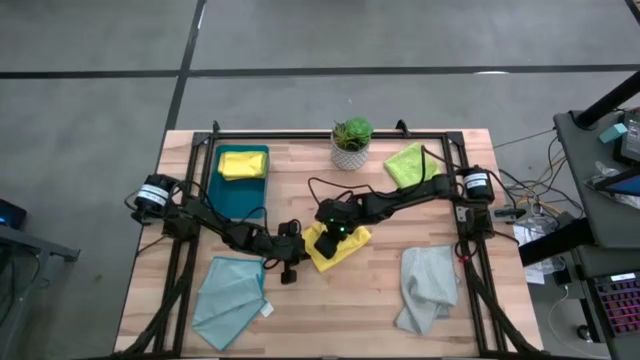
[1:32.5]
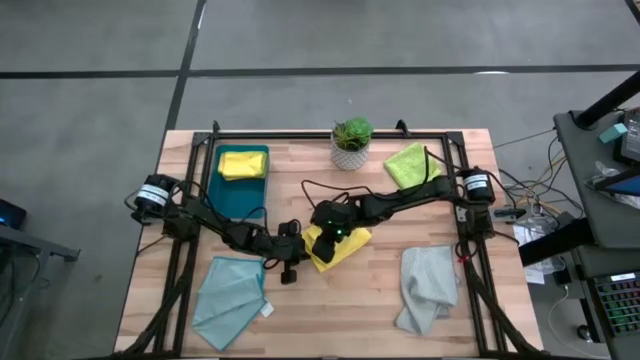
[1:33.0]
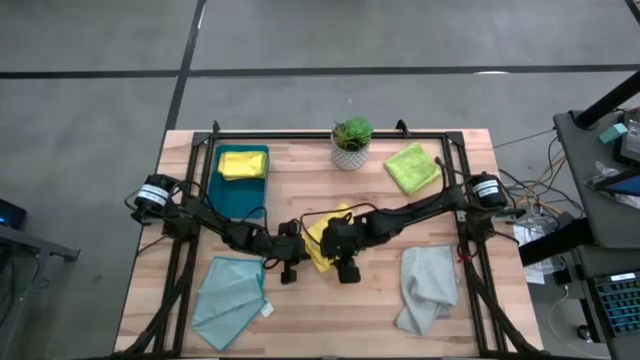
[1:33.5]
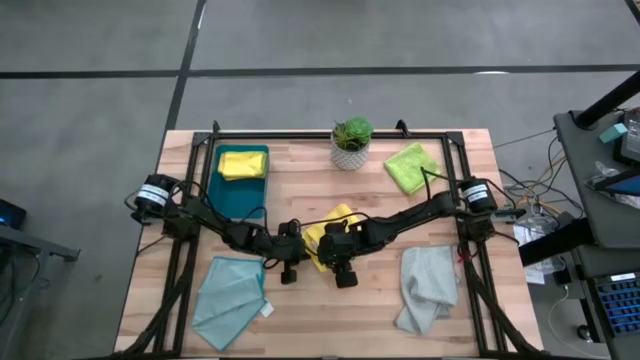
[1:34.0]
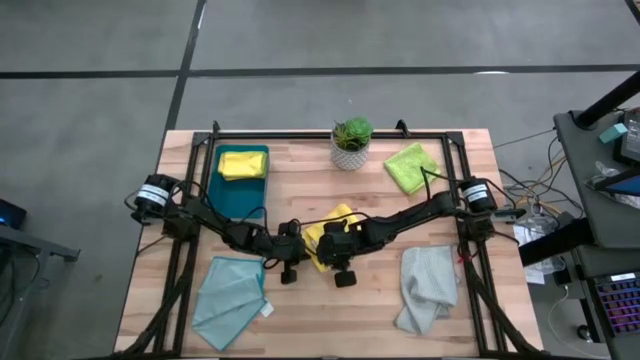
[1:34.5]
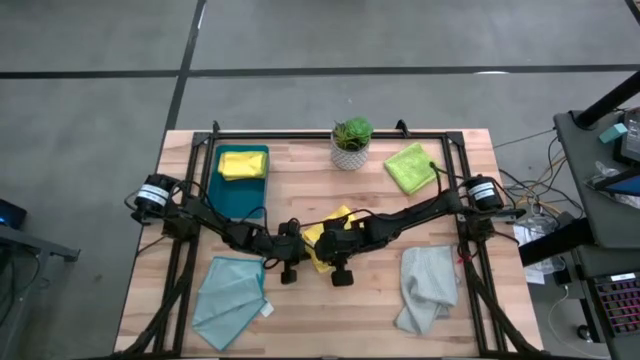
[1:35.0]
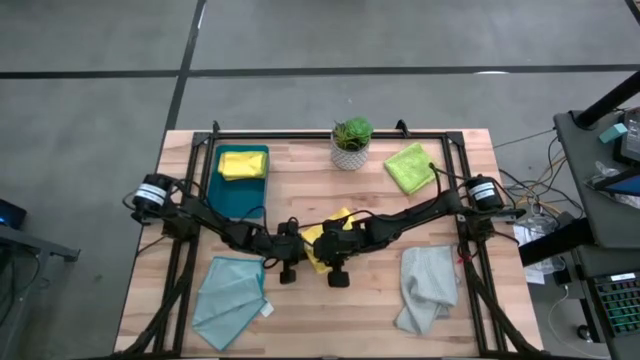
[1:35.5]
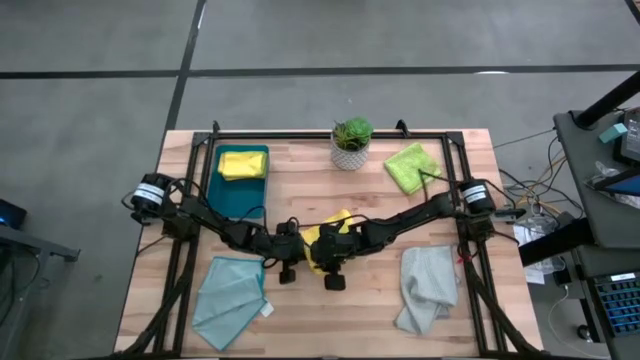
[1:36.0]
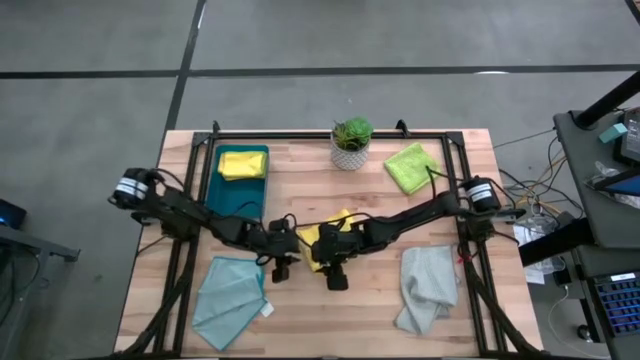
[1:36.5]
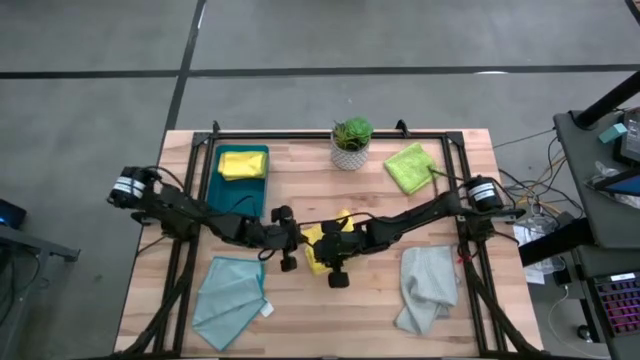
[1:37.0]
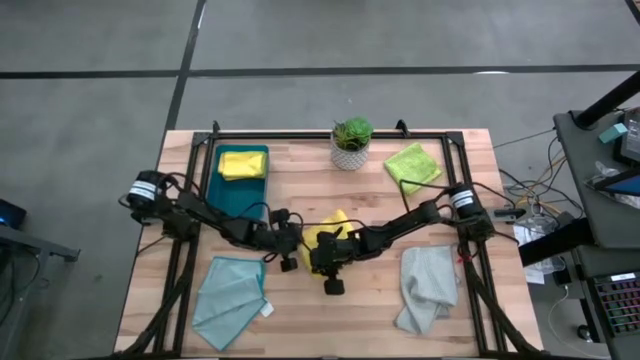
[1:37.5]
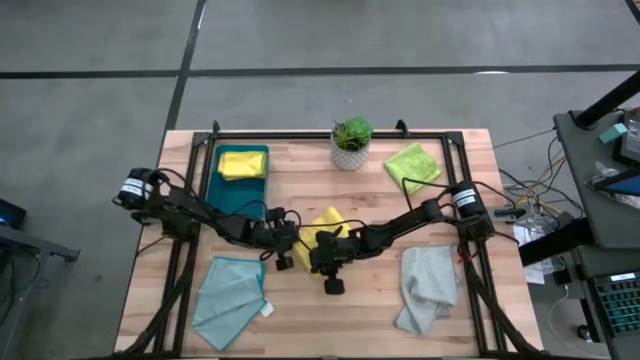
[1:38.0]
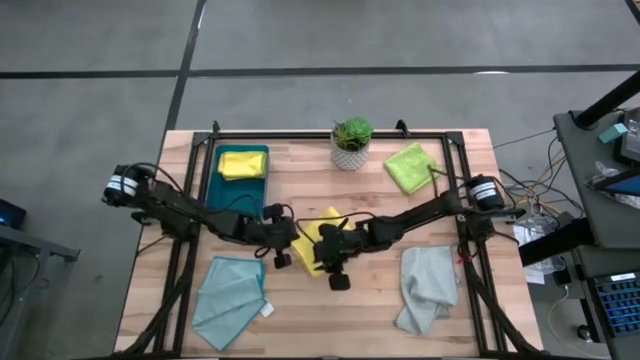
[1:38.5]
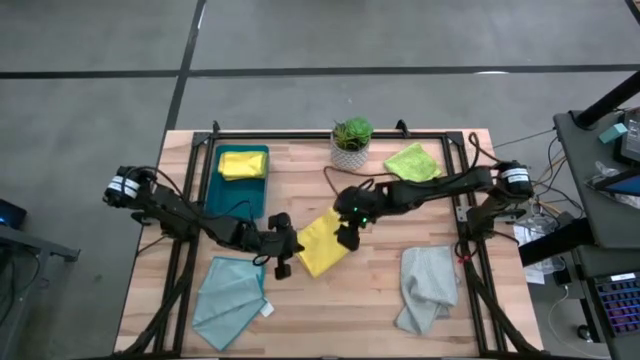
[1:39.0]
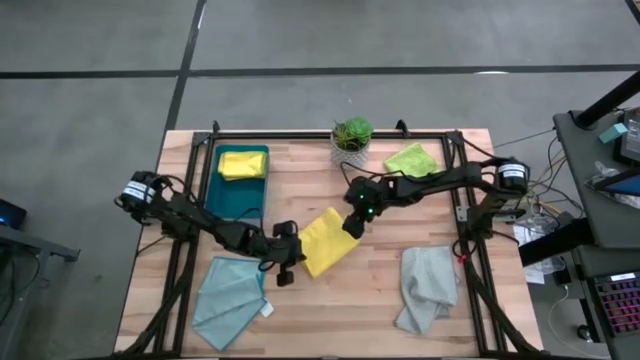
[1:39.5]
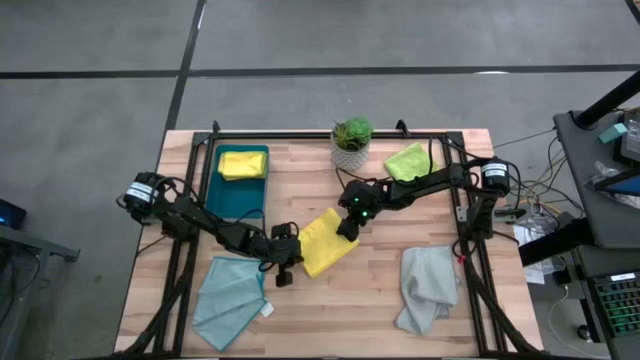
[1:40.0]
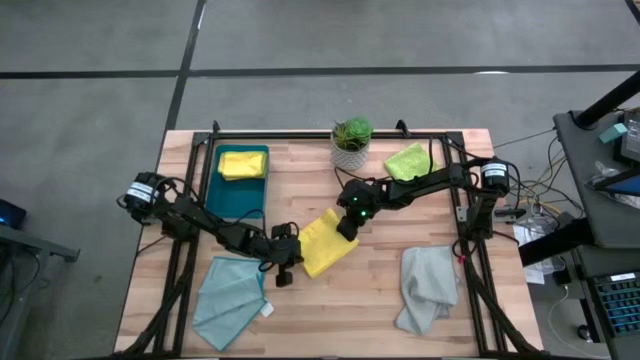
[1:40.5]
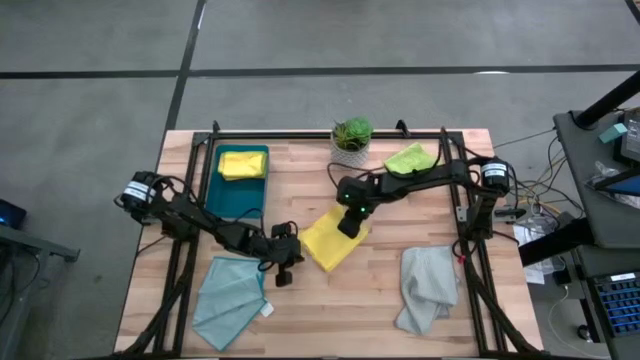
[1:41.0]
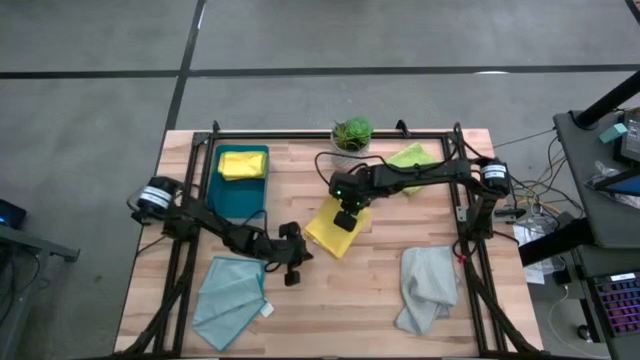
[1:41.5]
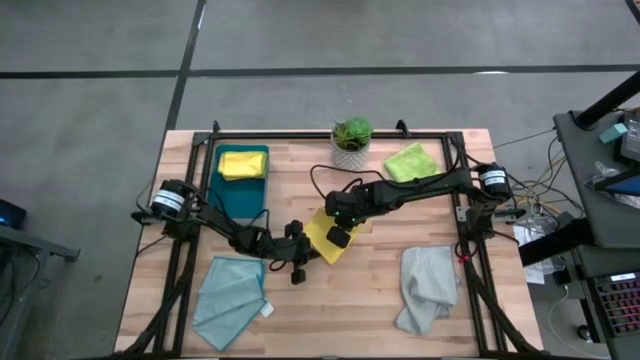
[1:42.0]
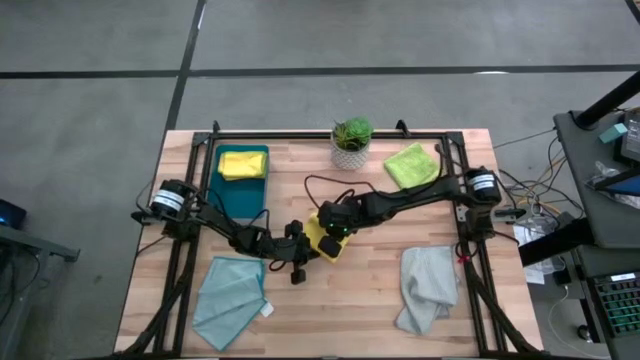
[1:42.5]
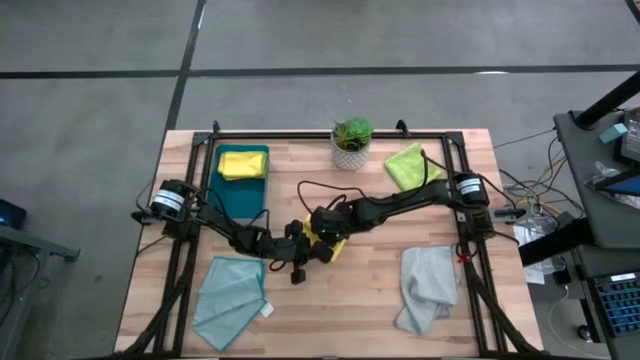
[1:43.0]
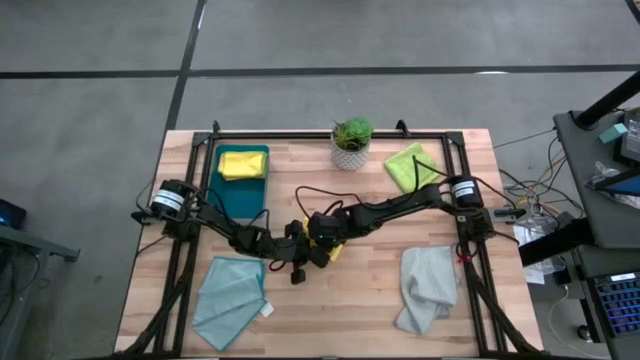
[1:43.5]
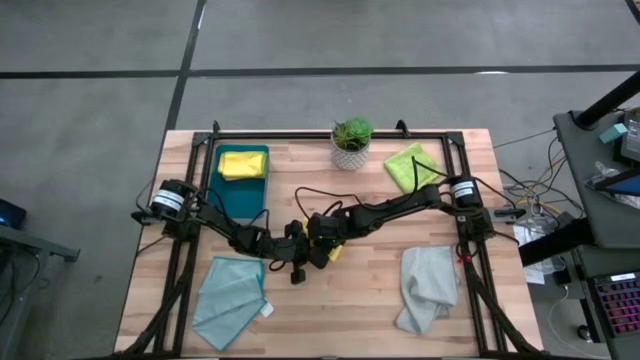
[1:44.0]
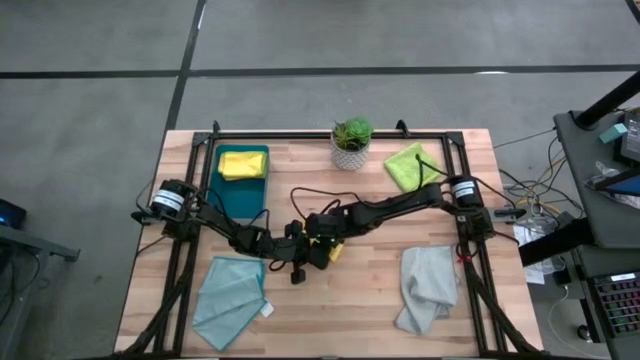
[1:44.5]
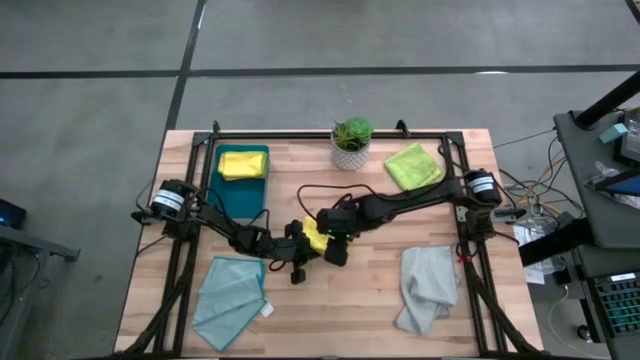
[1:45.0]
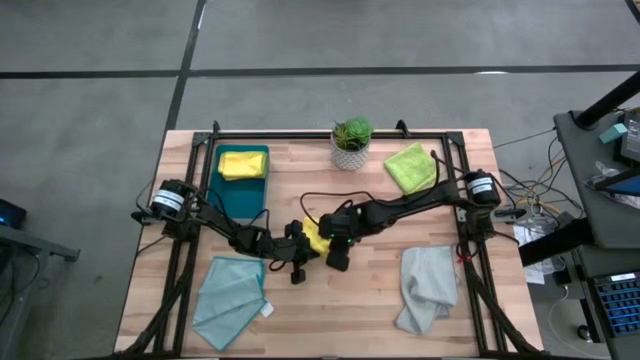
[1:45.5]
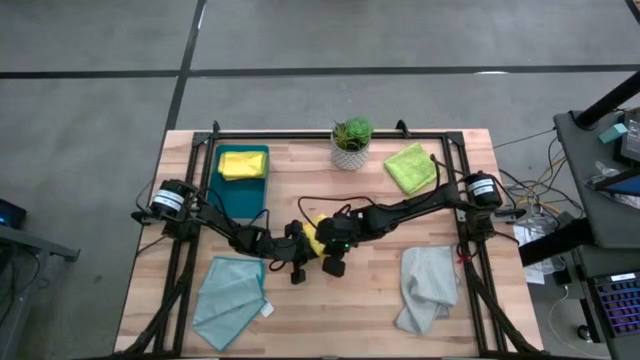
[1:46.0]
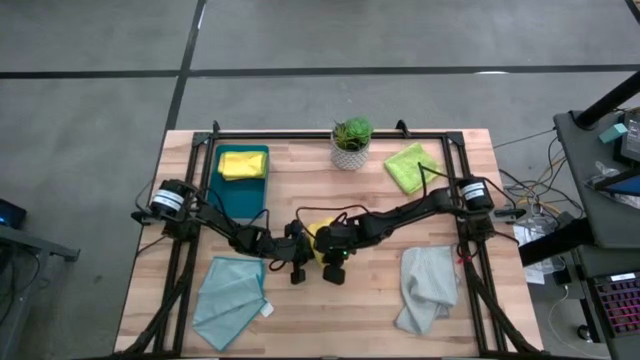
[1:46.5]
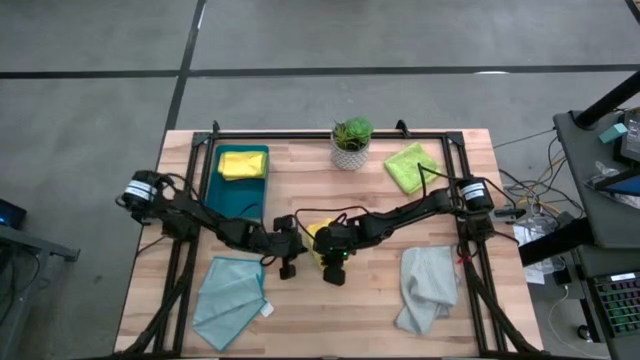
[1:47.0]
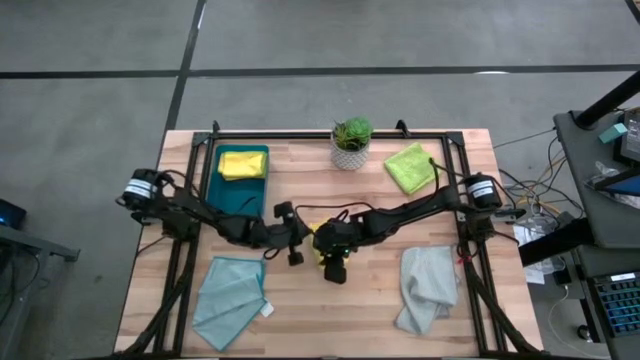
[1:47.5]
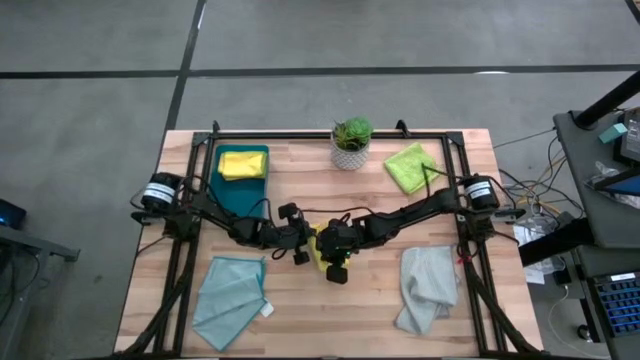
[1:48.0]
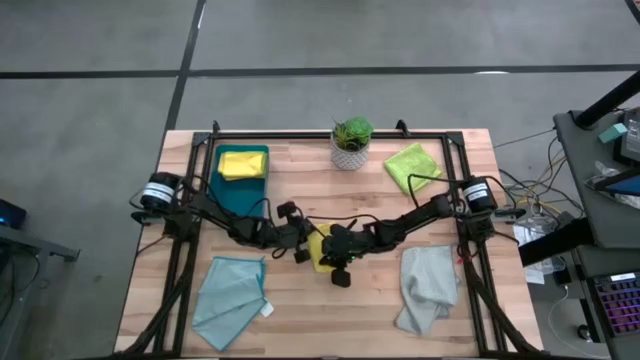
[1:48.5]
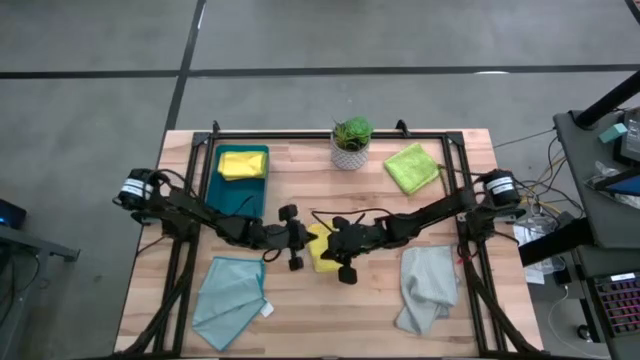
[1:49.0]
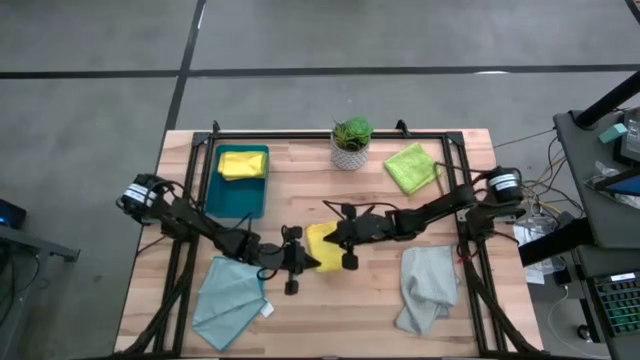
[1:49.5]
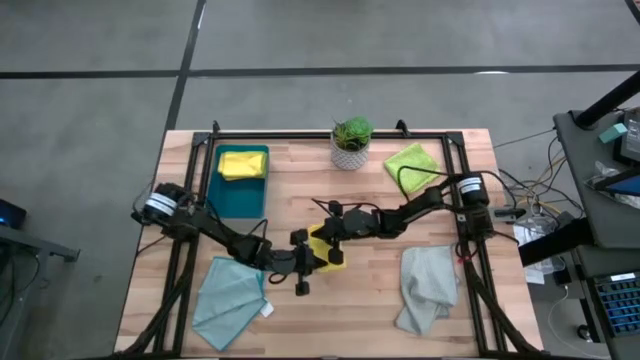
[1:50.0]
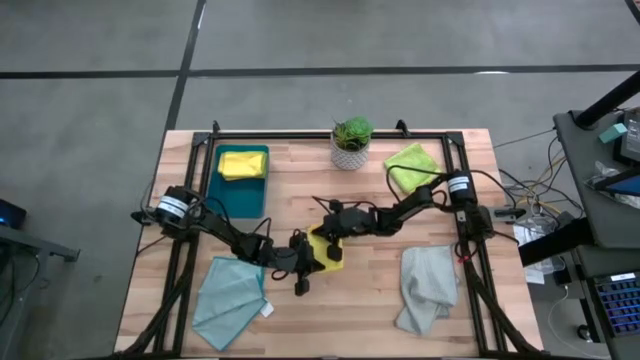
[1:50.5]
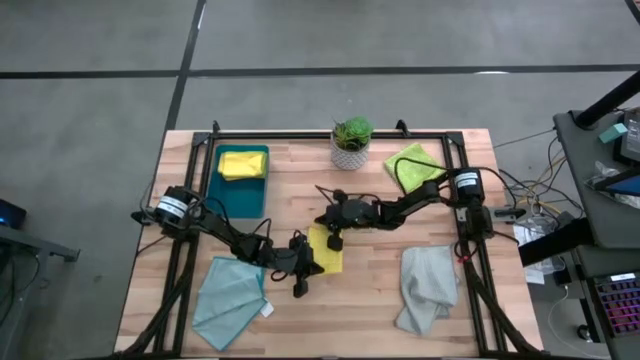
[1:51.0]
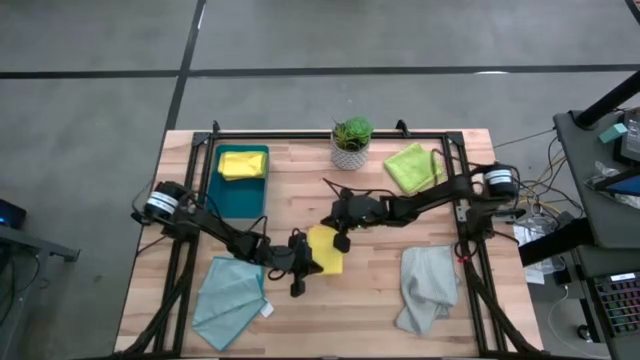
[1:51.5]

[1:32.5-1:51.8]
Task: Fold microfiber towels
Fold the yellow towel

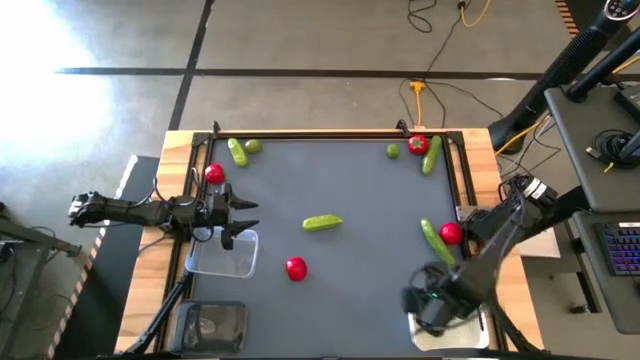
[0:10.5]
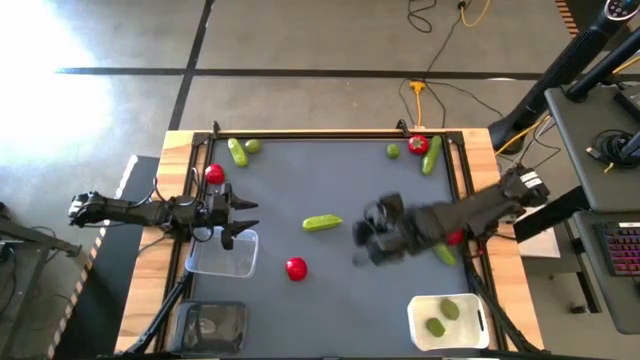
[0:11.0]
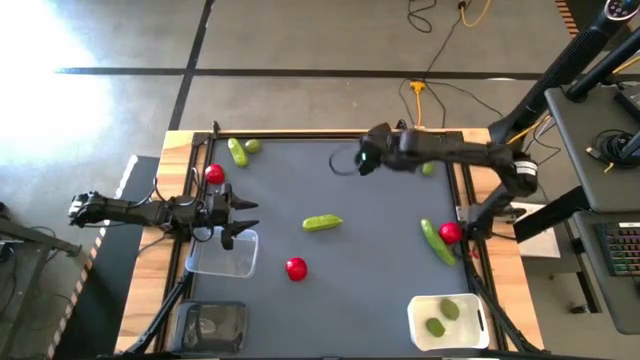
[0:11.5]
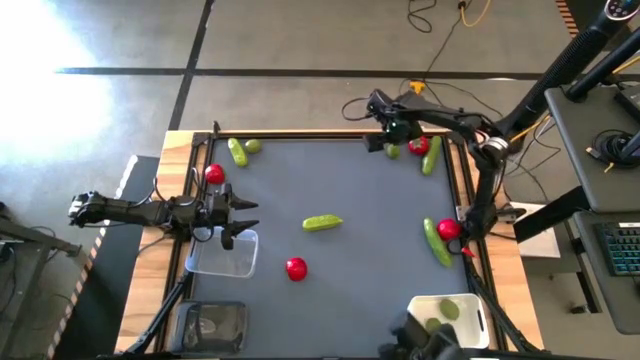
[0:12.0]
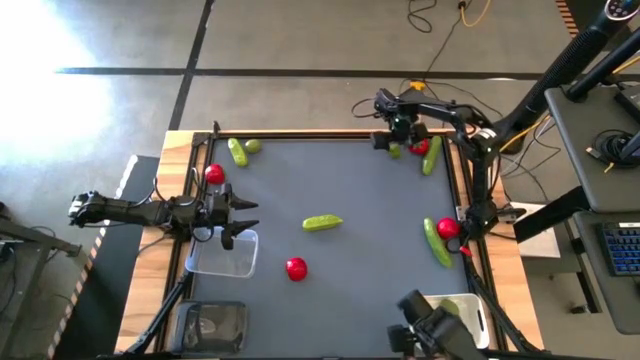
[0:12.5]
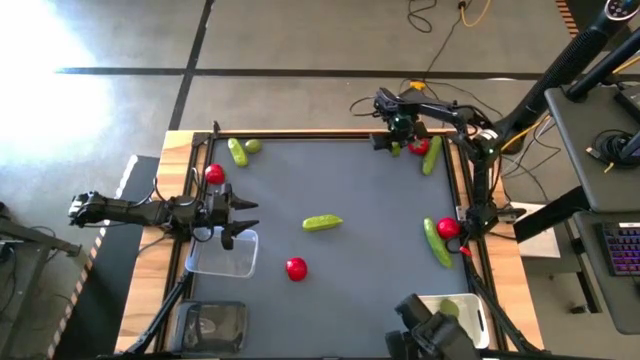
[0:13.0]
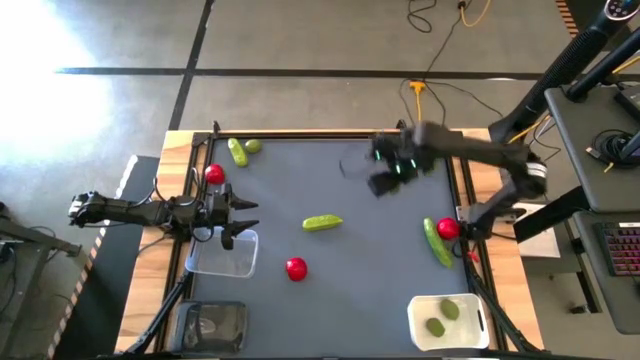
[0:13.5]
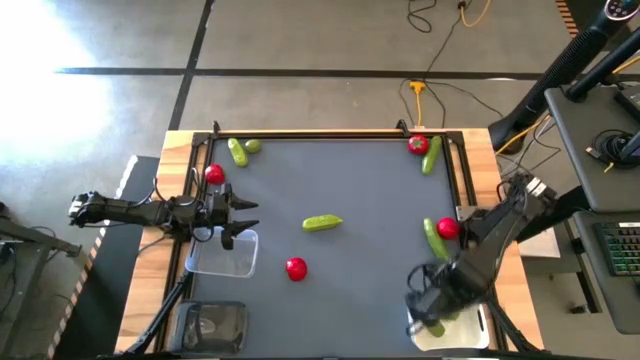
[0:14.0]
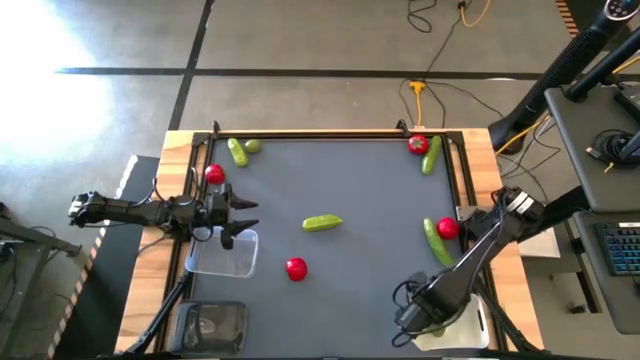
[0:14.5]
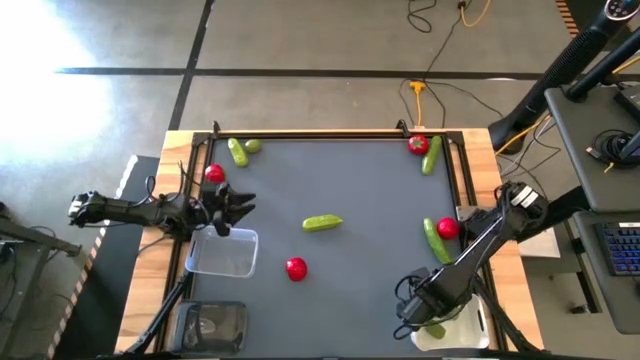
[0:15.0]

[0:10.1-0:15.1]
Task: Sort produce into baskets
Put the right lime into the white bin
